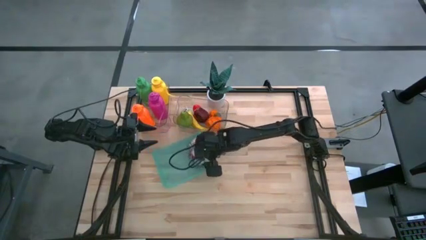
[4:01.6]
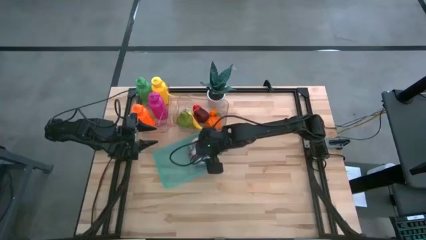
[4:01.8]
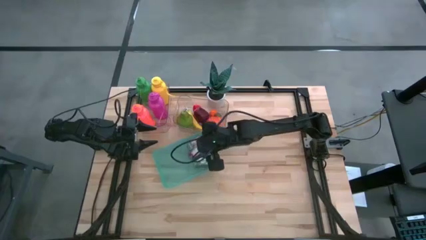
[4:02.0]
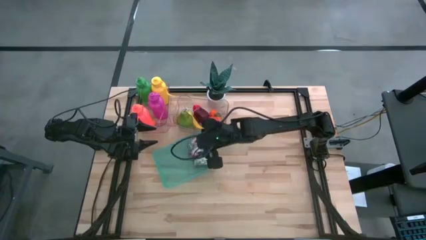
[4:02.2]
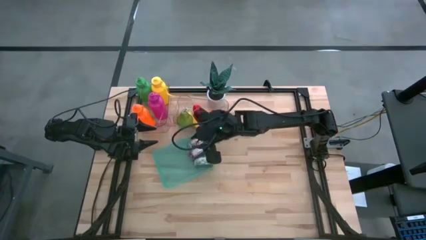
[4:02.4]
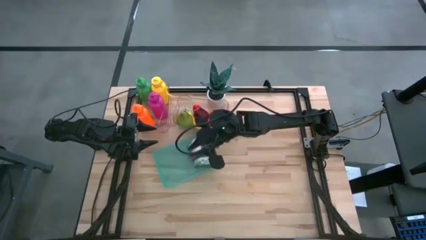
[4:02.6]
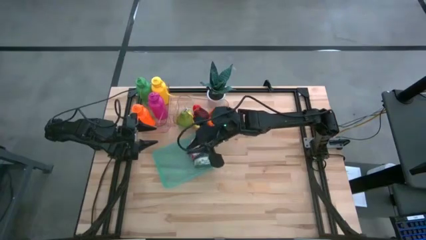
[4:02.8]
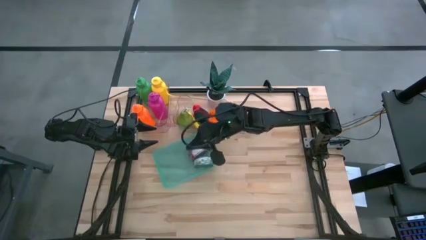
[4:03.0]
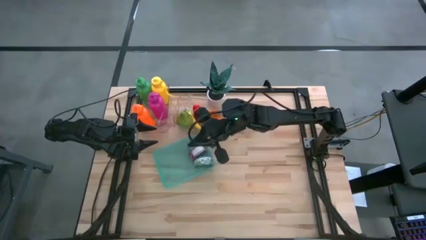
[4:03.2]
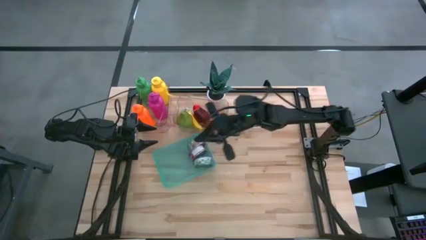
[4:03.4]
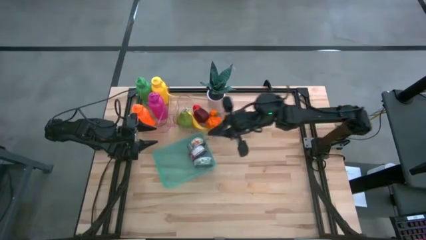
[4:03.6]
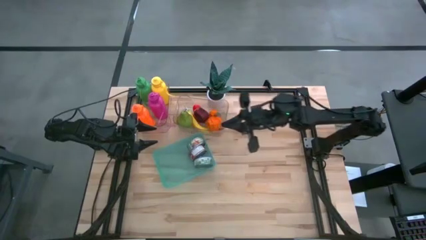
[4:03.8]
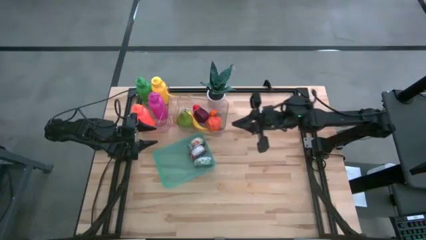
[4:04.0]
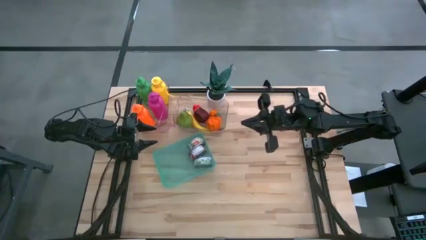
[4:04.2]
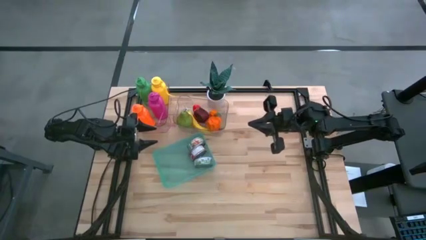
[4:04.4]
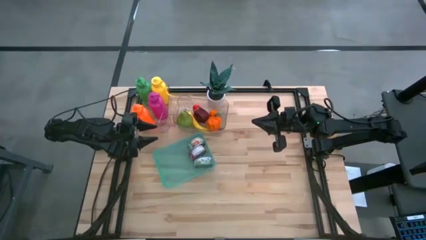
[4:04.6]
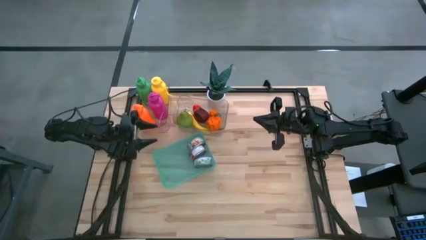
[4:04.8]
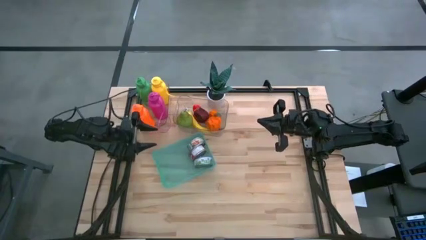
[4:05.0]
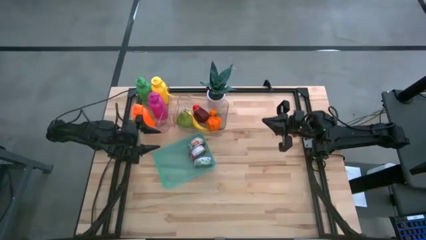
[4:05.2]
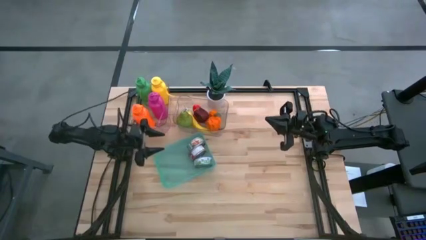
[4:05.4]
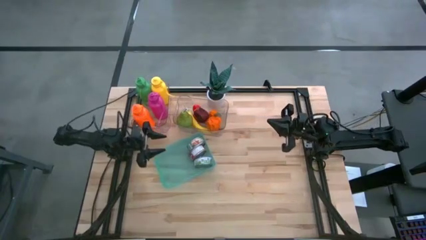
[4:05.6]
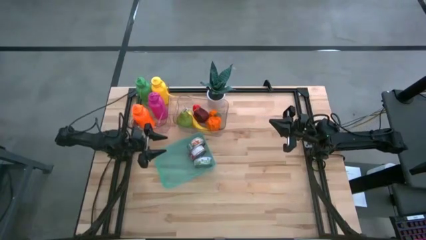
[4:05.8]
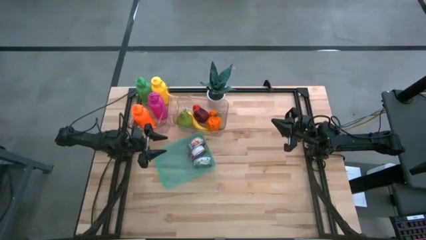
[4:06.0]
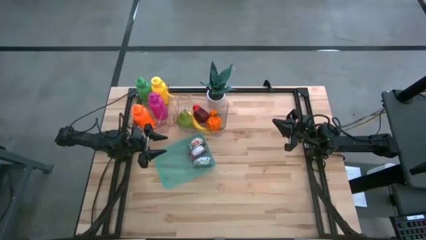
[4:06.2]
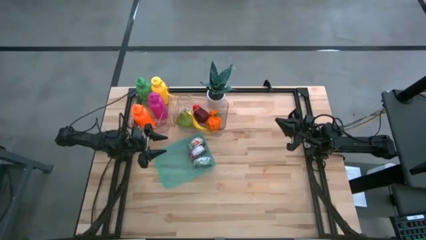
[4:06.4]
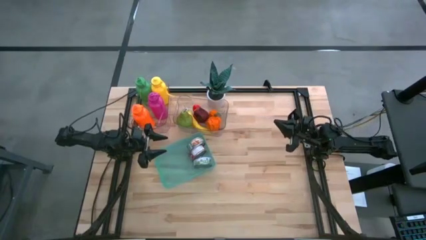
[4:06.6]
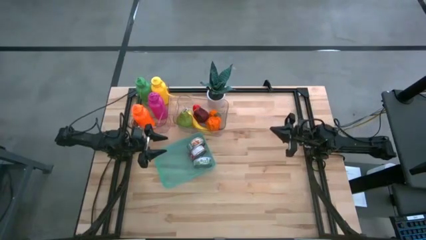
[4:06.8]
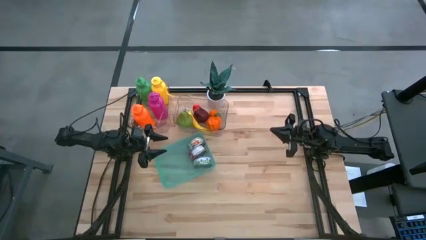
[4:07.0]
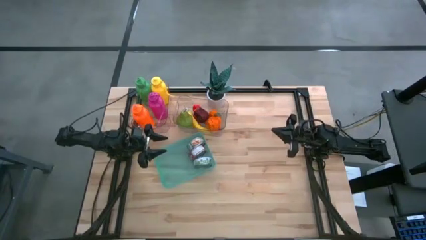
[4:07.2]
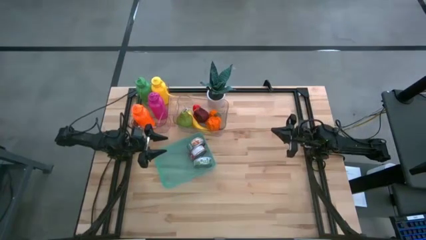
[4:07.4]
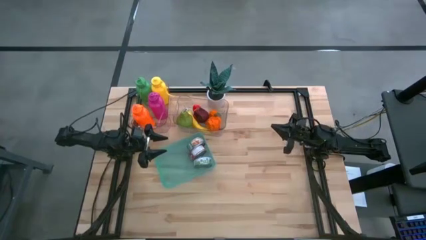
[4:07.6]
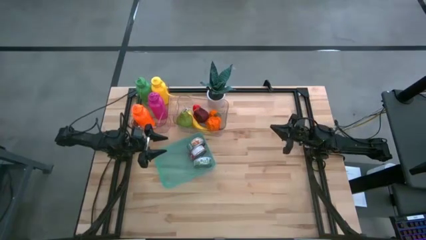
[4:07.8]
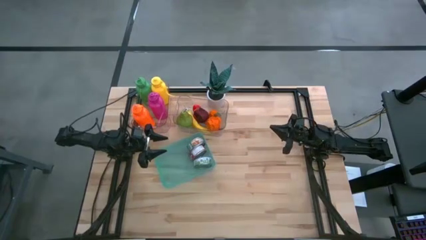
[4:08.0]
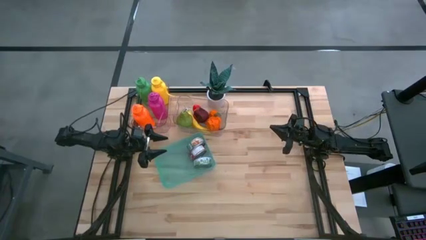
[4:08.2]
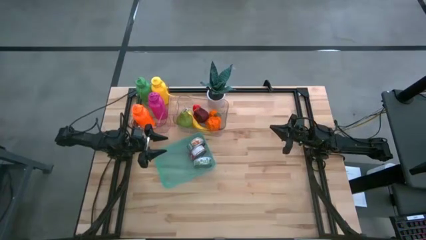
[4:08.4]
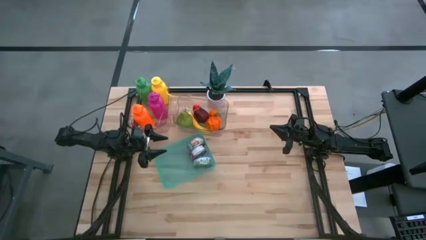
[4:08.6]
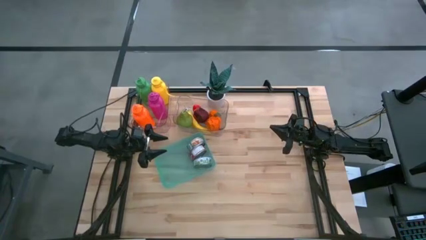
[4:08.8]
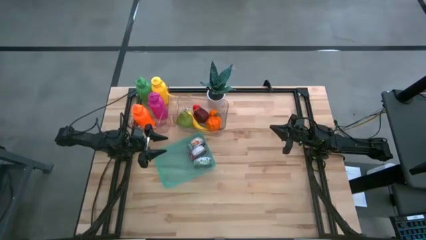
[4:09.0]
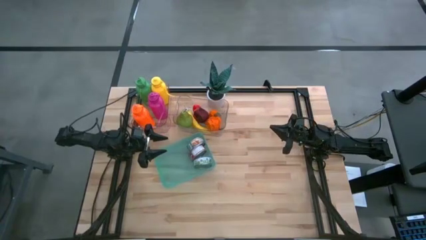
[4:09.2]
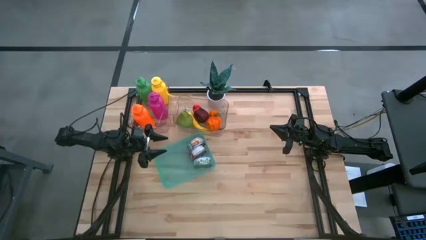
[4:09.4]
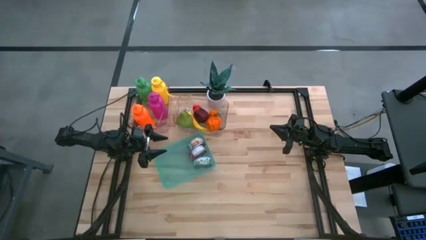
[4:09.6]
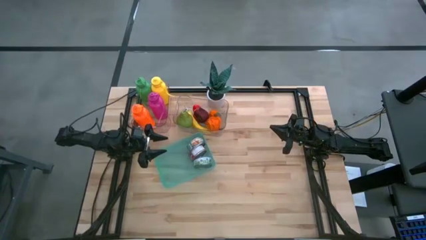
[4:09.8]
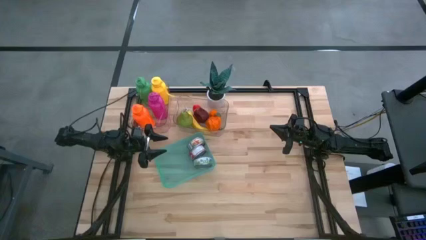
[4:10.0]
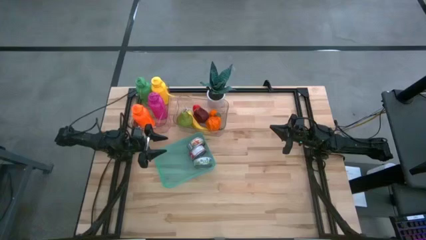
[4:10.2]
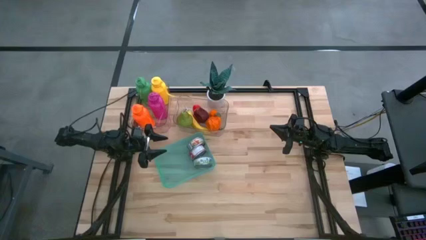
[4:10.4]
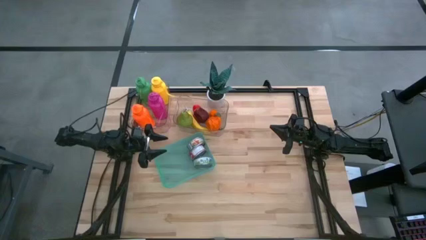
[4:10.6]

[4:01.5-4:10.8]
Task: Pick & Place Food Item
Return to Home Position

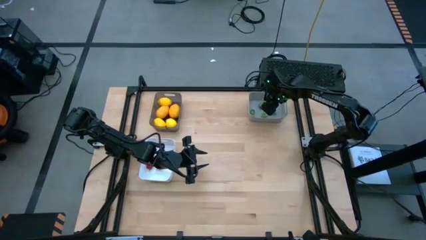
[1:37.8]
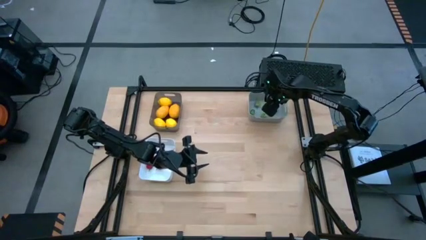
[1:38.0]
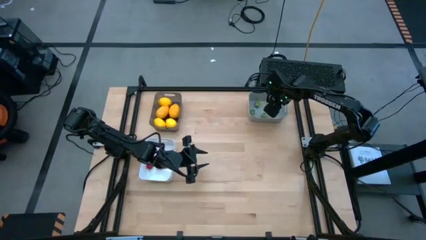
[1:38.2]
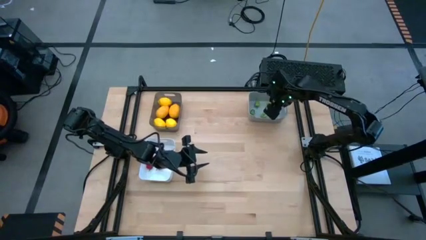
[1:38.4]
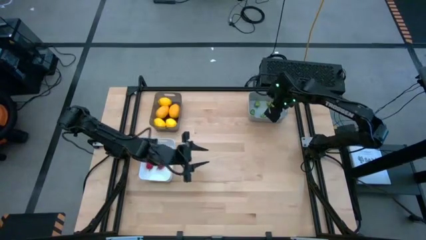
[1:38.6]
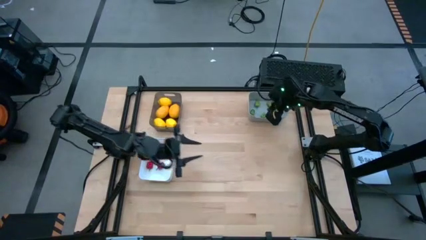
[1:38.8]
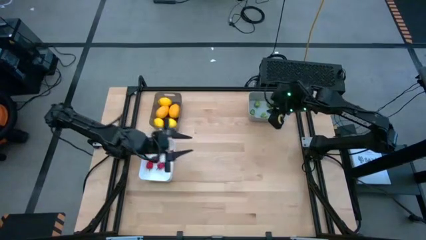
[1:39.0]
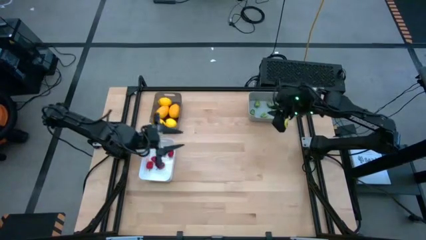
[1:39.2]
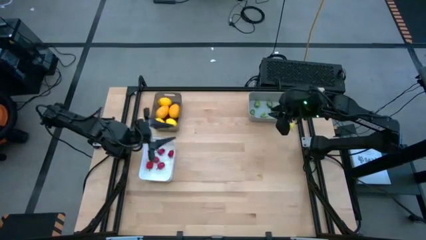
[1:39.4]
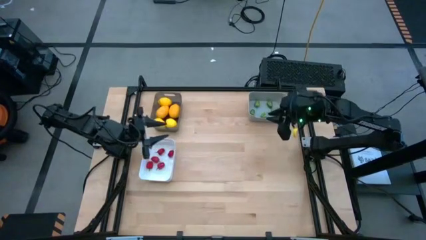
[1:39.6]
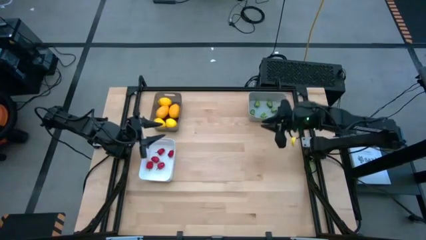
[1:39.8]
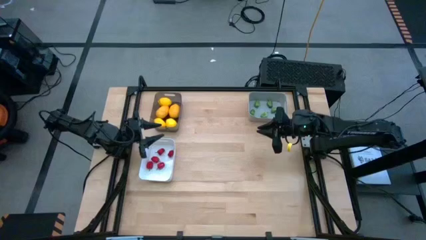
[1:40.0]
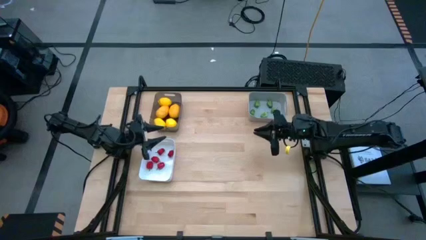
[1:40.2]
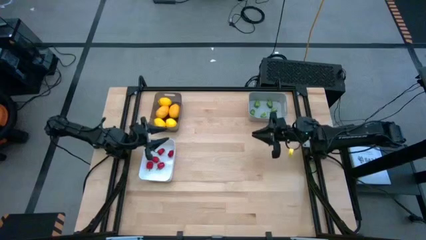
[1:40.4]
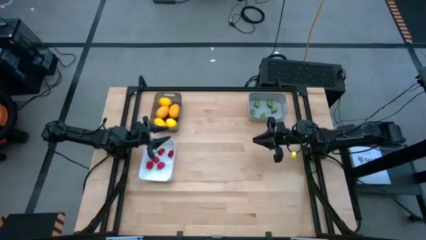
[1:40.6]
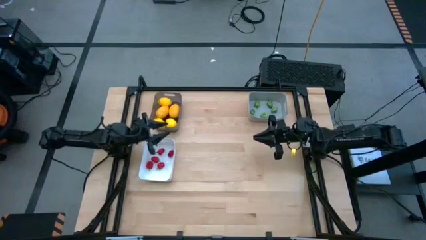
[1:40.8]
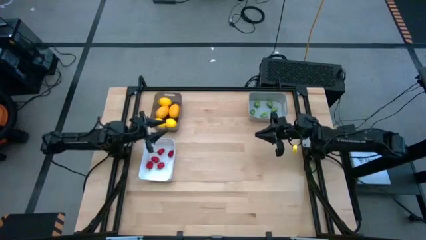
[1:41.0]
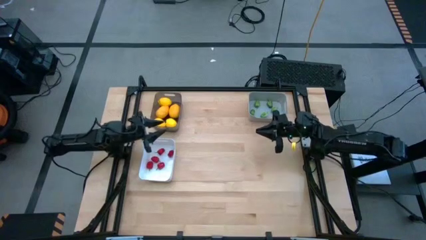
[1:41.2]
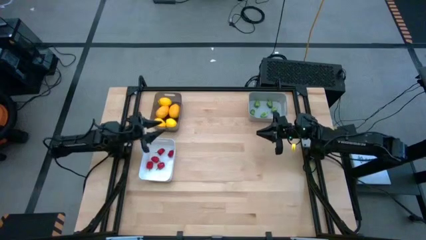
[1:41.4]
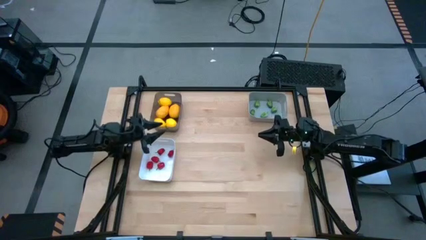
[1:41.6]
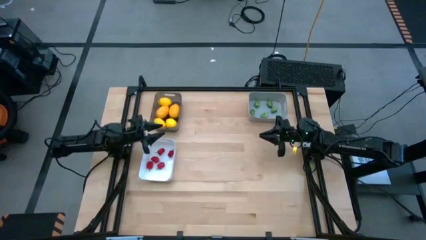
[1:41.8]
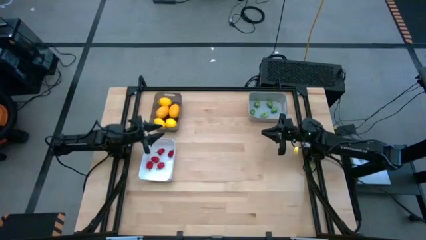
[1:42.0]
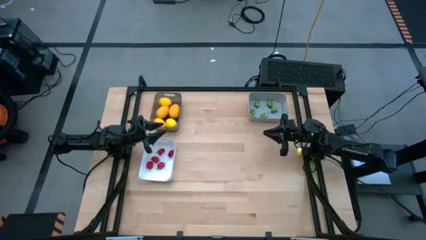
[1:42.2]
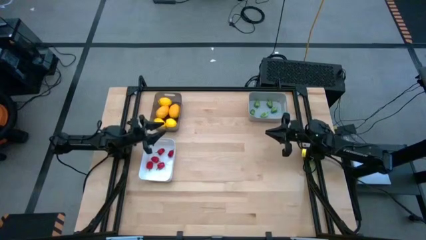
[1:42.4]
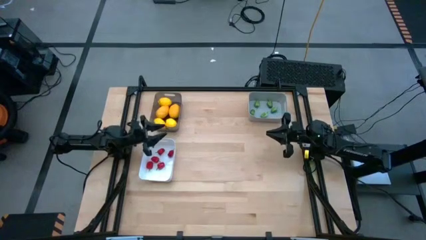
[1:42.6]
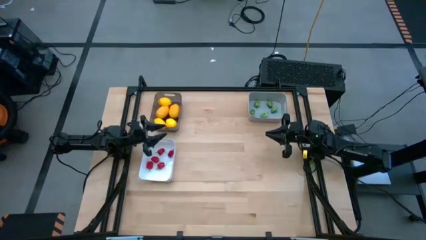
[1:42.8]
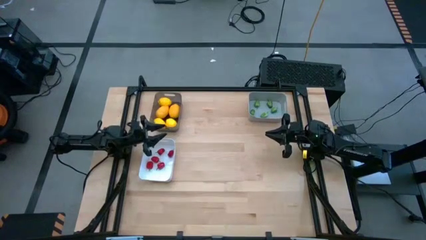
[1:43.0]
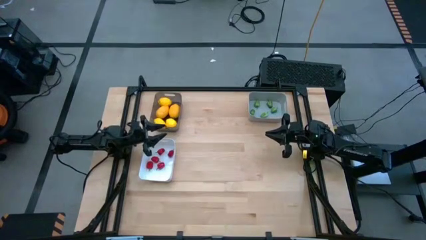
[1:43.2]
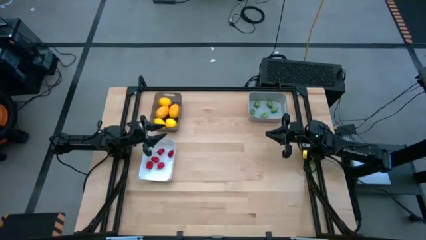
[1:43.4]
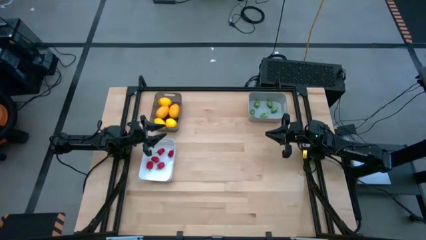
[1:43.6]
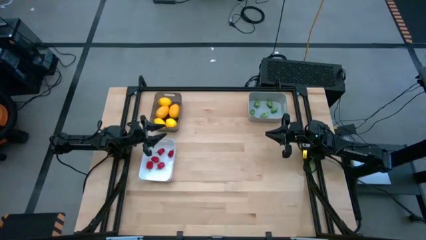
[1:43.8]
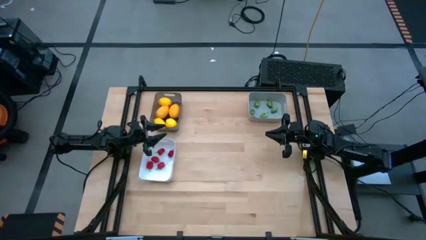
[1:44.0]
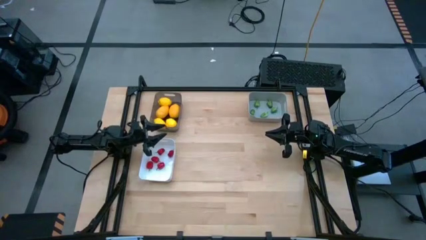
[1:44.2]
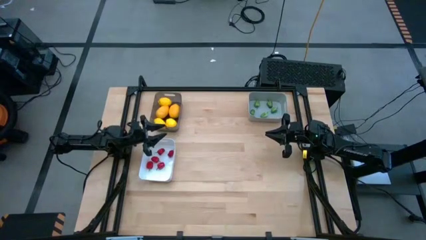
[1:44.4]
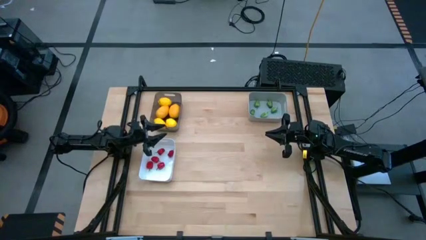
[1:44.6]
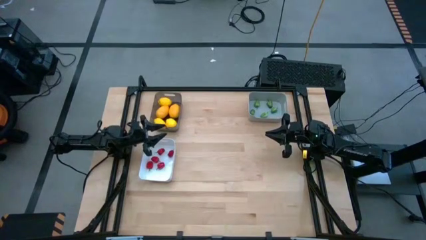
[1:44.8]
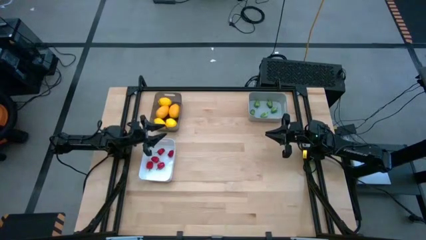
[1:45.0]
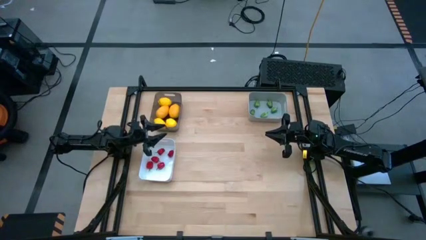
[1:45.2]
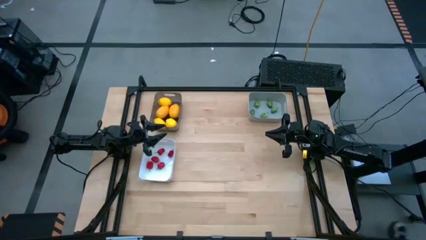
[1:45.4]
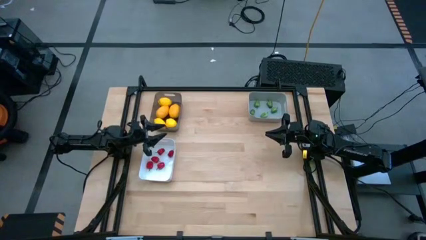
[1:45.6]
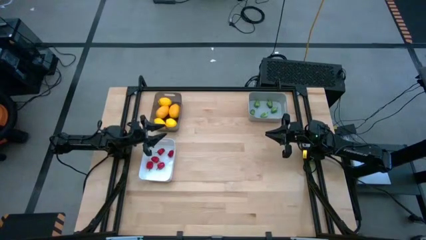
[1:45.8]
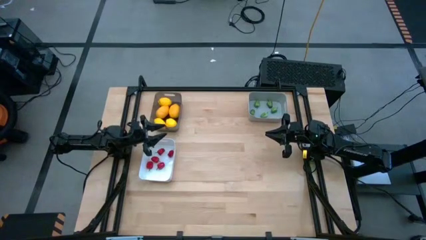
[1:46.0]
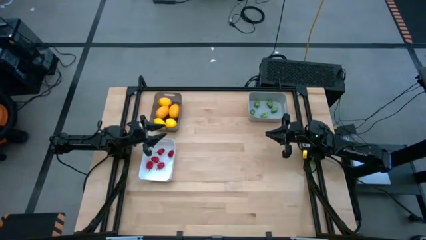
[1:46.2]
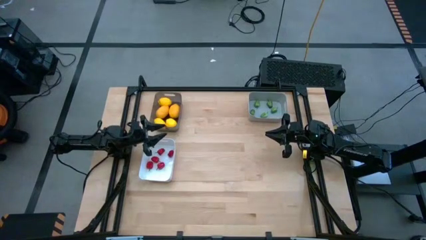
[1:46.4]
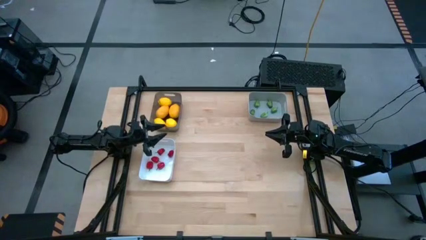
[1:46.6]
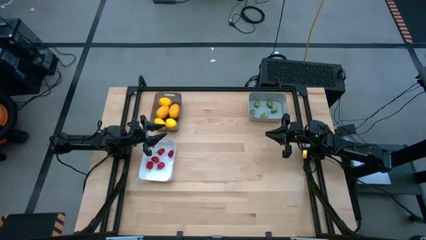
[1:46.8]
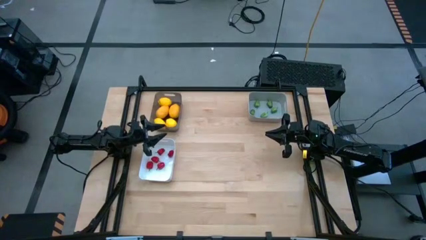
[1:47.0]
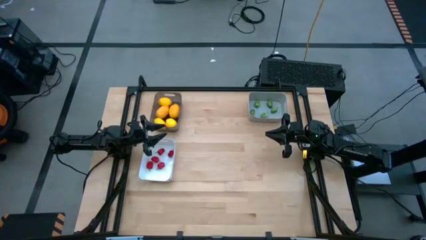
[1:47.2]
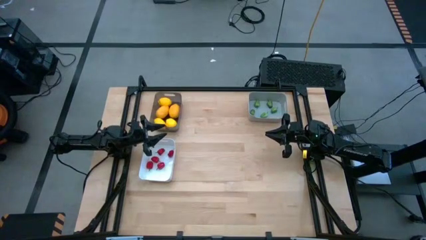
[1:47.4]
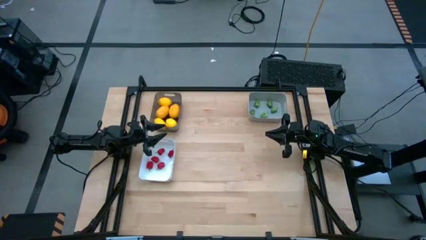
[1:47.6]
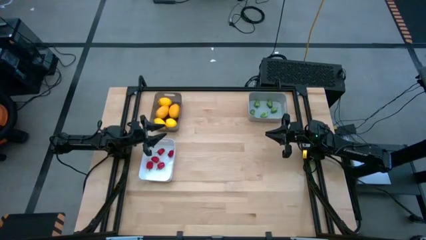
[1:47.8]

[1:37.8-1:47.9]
Task: Sort produce into baskets
Return to Home Position
